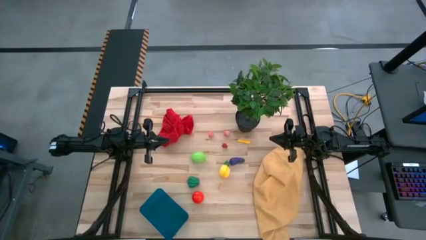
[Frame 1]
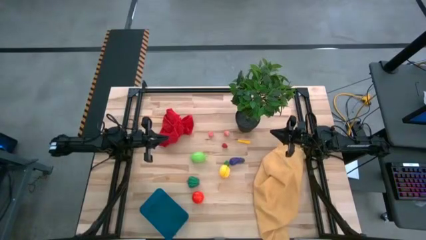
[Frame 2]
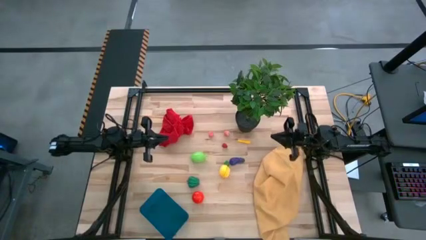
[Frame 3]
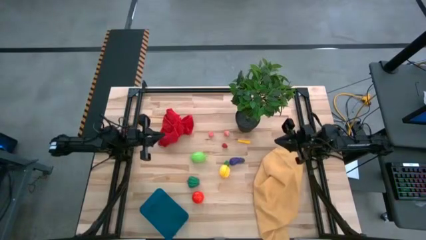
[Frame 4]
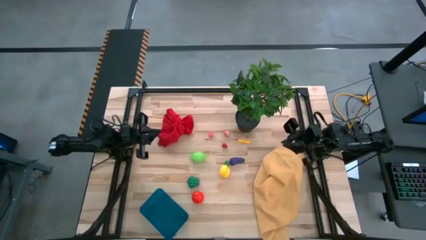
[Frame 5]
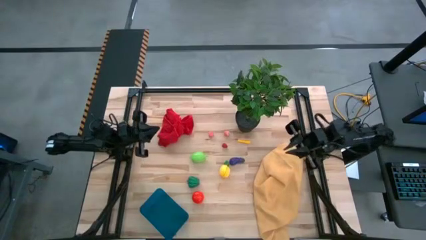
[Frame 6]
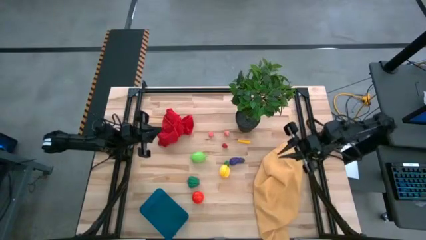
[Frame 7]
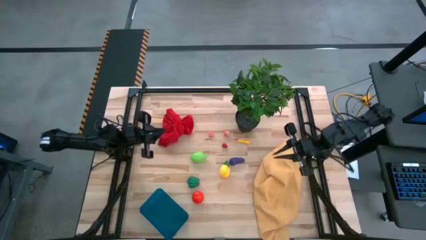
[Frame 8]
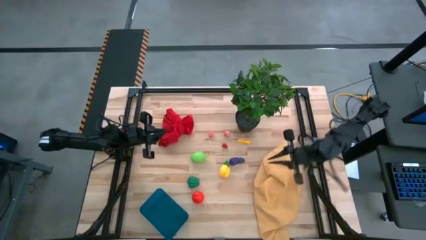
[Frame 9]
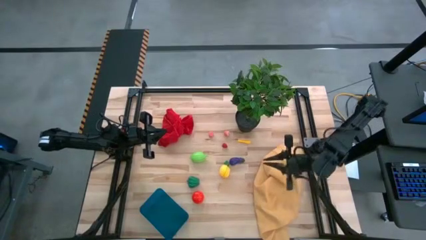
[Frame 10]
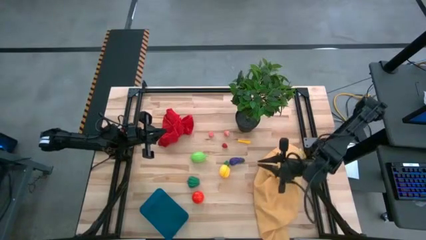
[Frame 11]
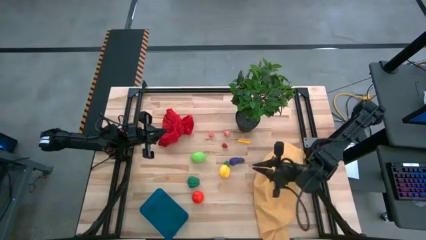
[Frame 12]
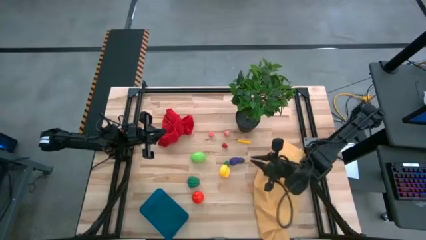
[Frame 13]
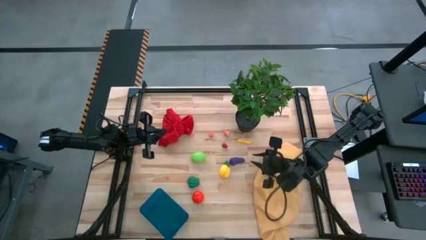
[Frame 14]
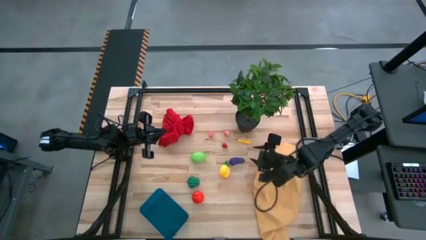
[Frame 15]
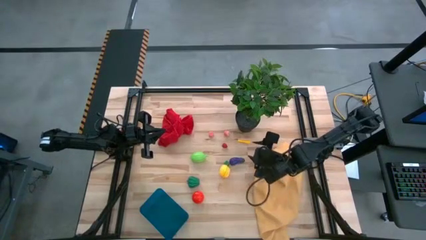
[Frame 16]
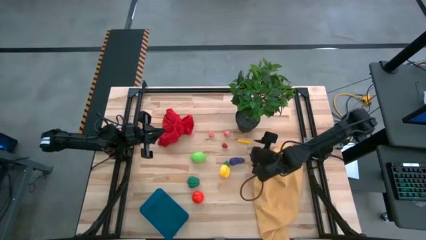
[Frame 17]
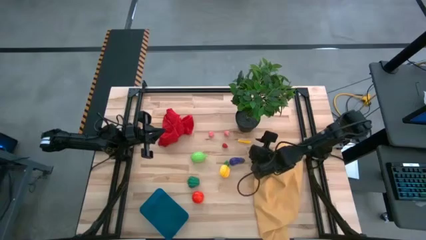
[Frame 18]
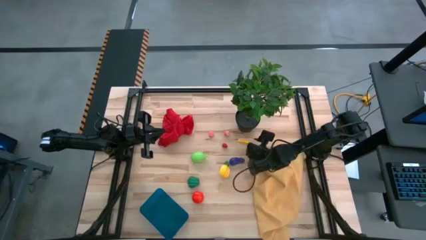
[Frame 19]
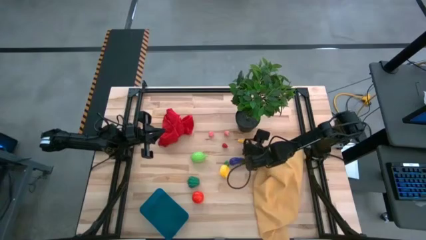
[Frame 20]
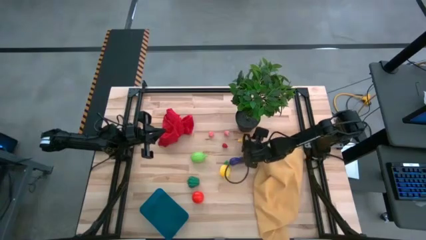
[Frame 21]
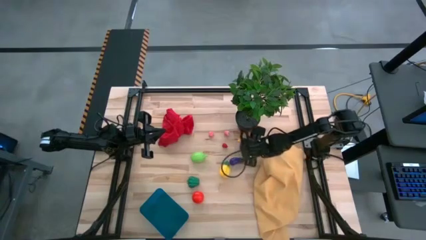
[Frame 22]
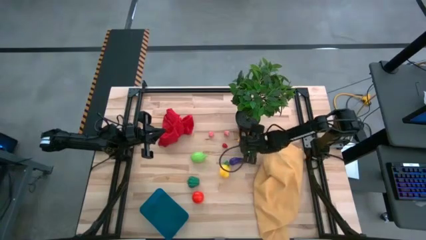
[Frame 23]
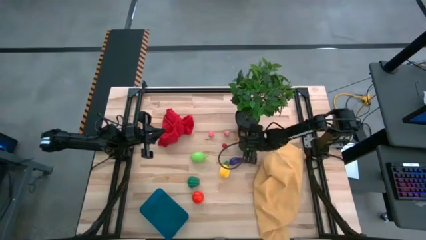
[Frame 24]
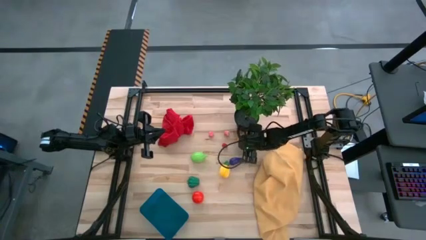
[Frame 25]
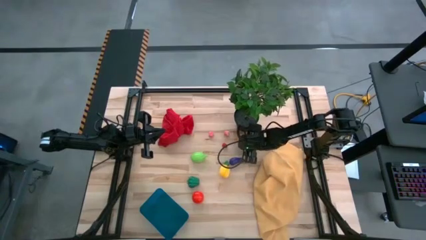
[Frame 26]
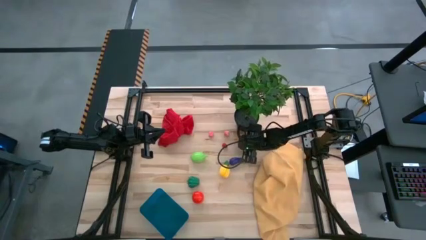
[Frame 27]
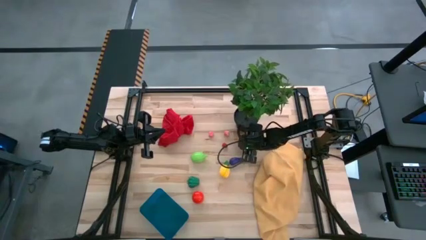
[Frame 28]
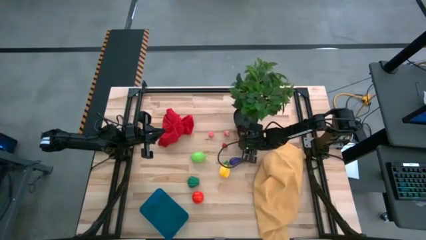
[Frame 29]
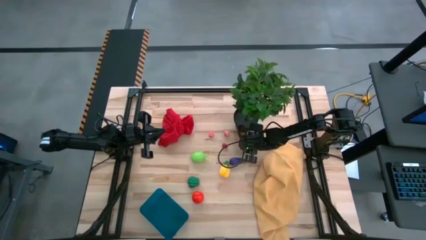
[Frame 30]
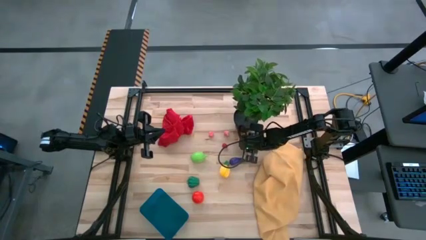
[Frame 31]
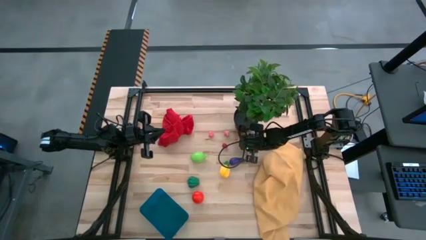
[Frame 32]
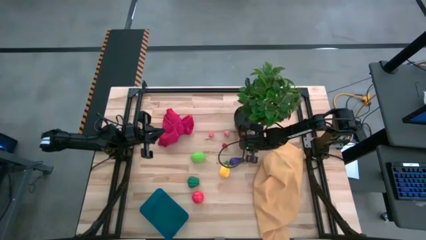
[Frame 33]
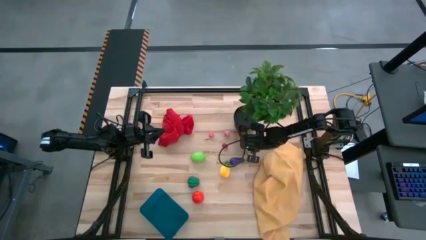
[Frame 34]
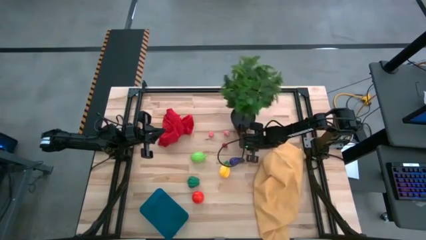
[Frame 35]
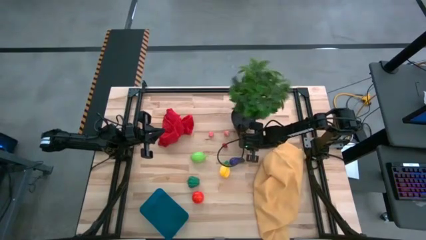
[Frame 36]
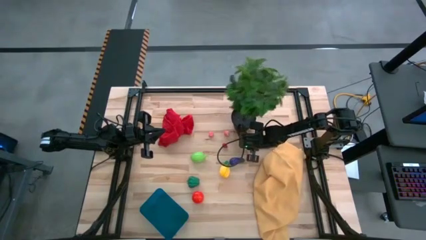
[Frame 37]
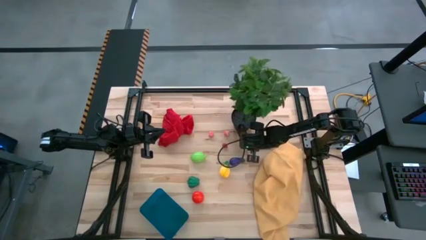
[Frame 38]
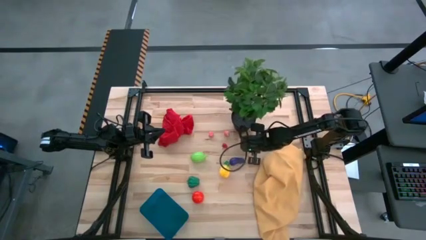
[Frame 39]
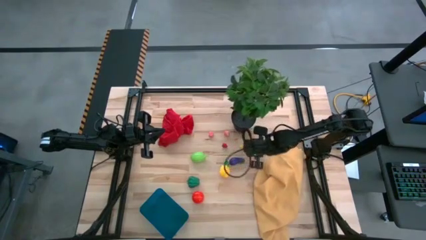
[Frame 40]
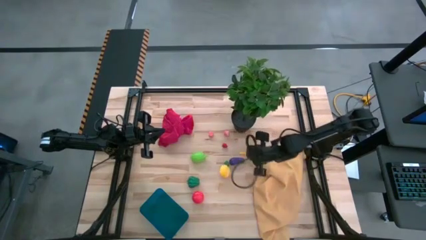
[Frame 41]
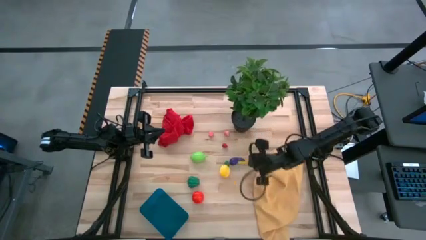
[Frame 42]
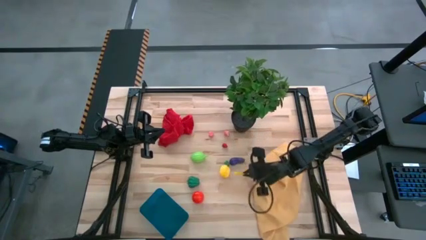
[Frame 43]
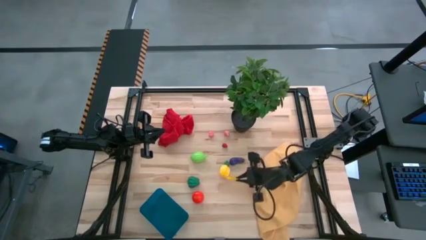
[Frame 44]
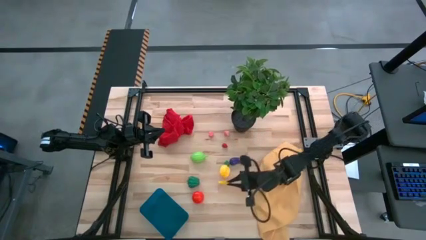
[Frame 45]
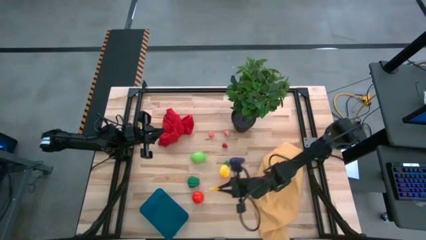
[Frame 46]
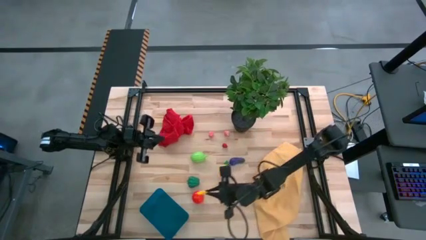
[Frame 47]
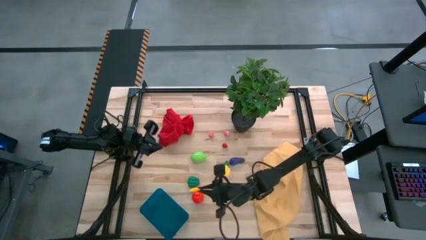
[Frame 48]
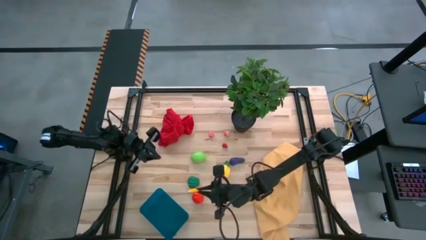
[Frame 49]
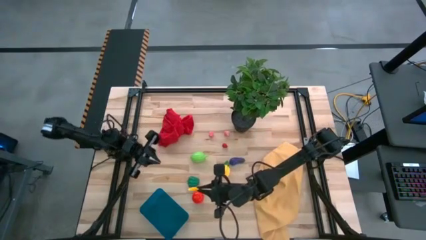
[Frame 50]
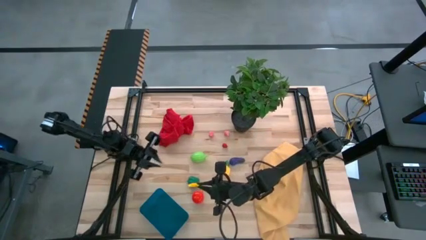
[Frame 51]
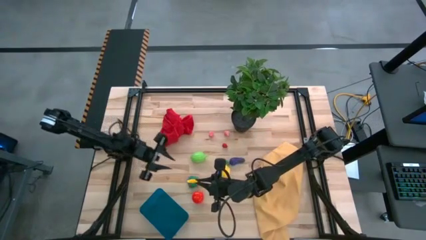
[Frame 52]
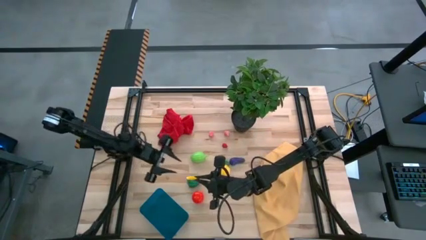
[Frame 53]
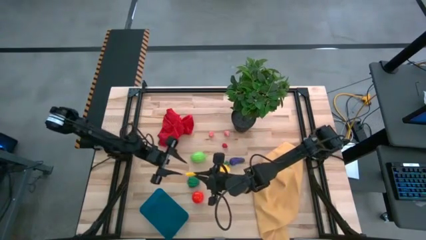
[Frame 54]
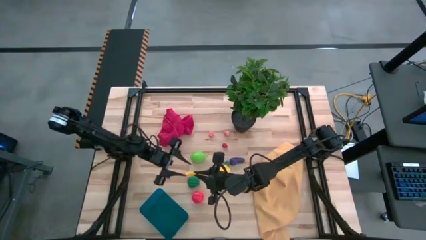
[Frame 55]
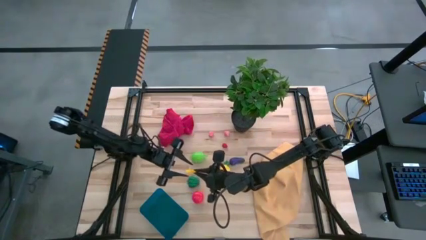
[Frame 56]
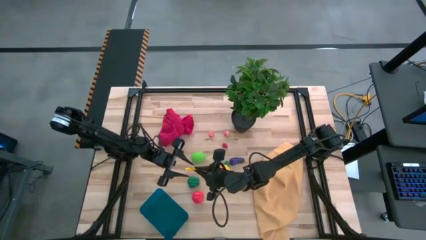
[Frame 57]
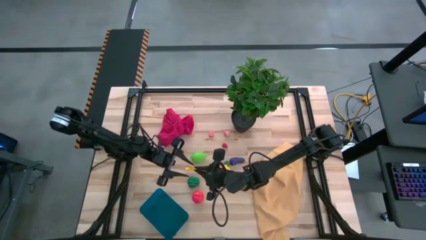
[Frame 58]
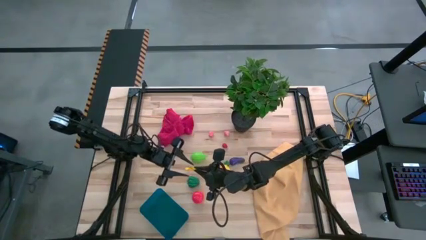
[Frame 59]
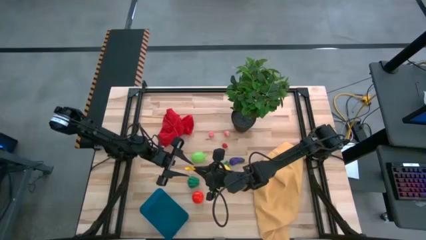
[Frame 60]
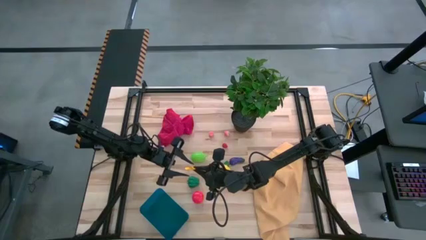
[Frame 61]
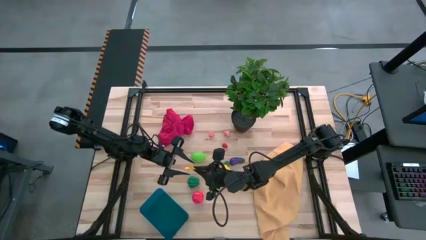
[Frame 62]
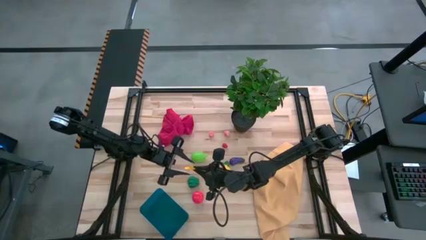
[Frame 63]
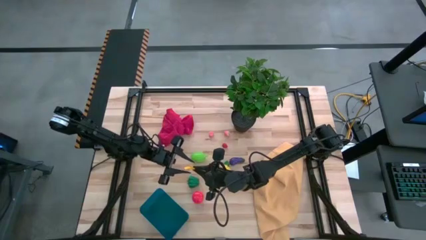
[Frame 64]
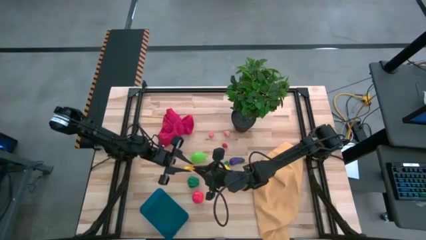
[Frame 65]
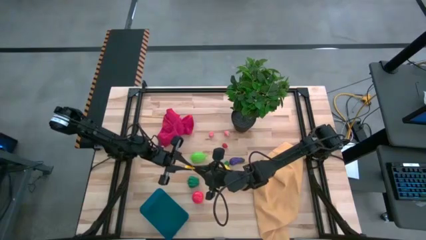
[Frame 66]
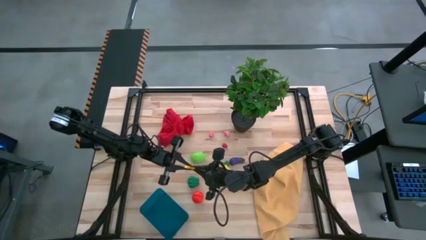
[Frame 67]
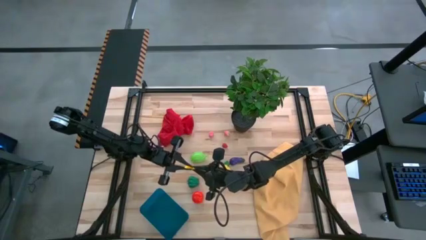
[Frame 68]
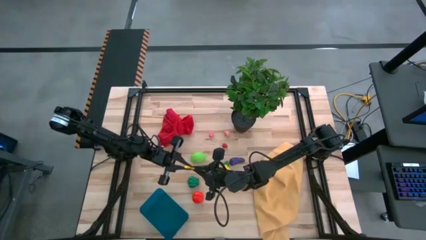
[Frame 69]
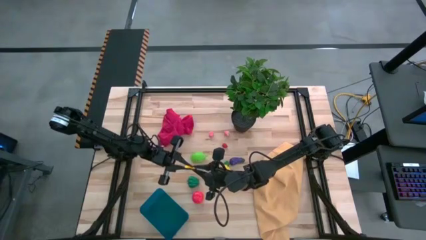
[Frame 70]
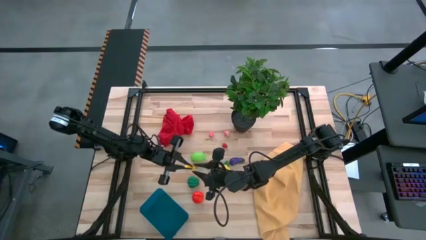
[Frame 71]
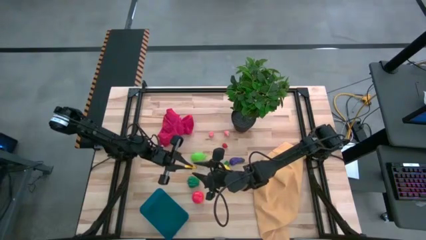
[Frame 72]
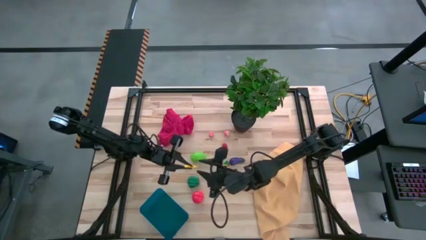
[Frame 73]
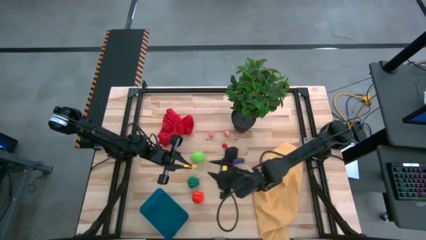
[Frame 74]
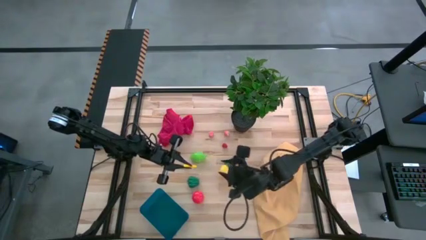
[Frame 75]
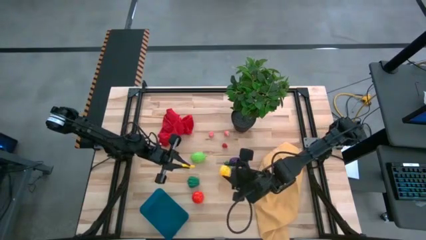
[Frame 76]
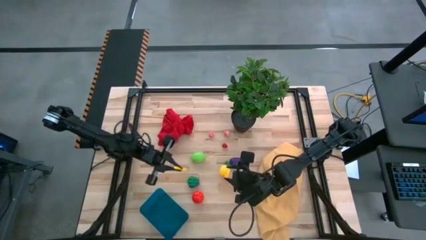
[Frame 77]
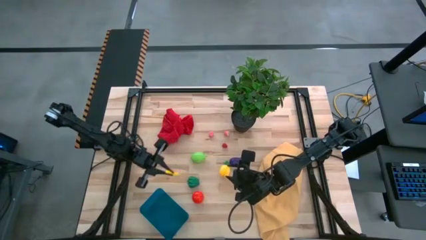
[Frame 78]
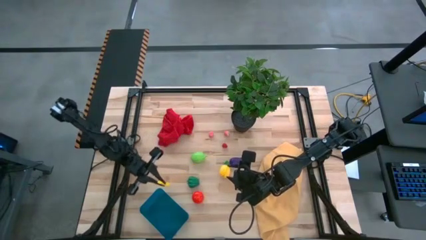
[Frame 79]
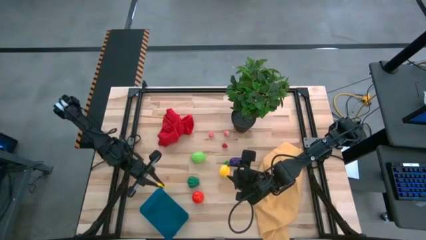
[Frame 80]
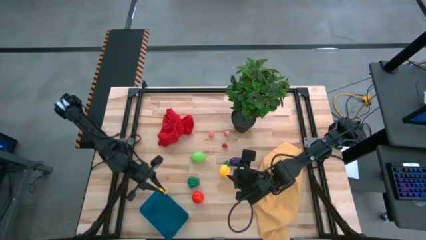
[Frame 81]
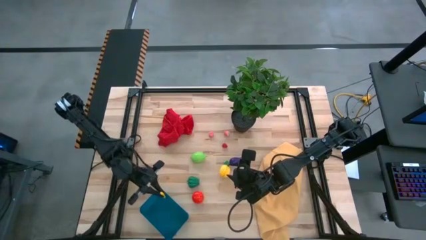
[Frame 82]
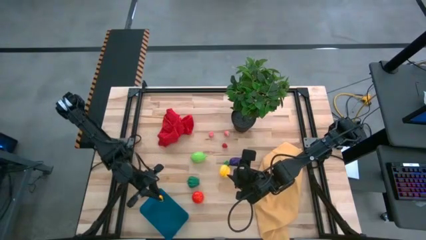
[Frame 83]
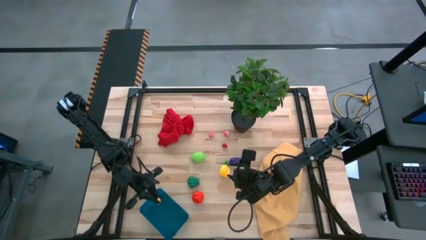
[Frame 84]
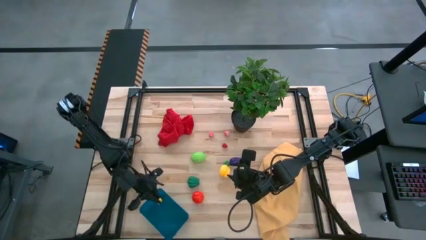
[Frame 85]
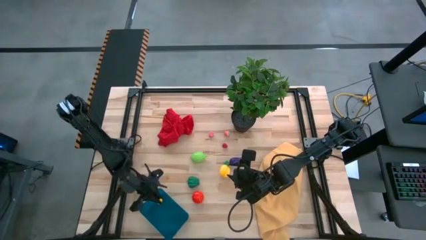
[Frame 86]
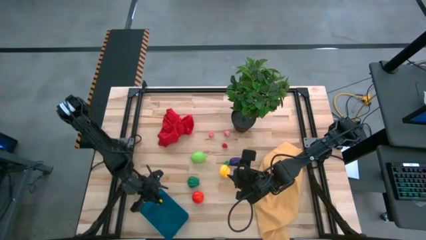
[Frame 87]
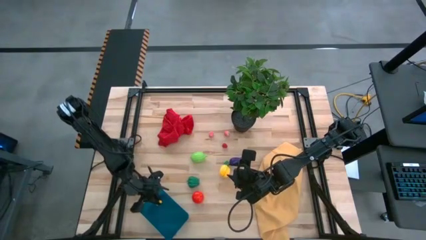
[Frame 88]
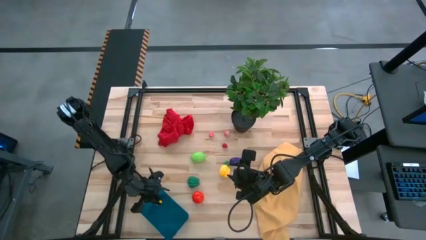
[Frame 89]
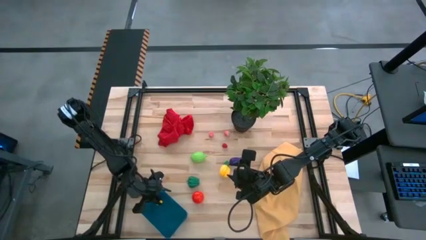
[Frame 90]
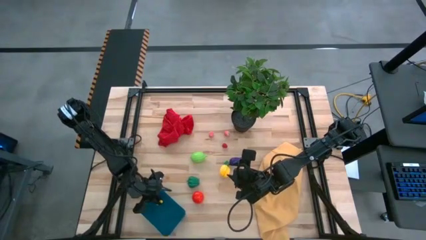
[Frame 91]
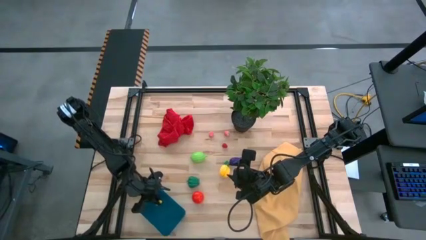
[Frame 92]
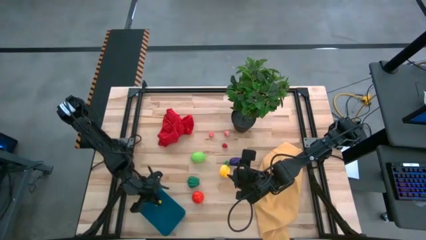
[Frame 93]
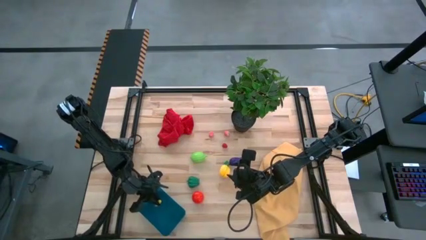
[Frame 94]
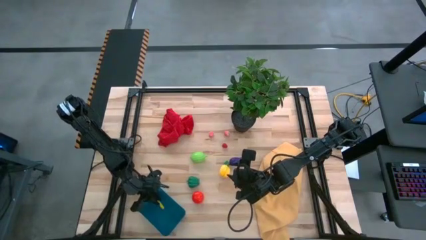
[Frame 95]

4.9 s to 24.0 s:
Task: Pick and placing Produce into tupperware
Put the yellow corn into the blue bin
